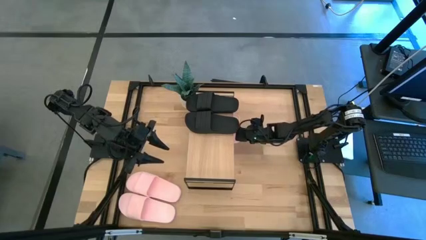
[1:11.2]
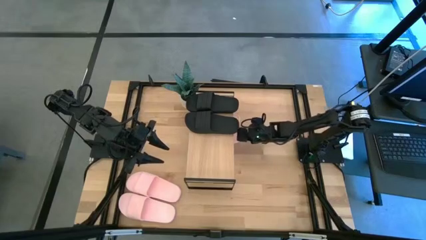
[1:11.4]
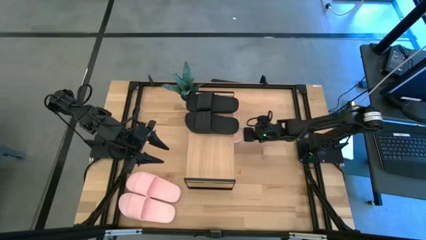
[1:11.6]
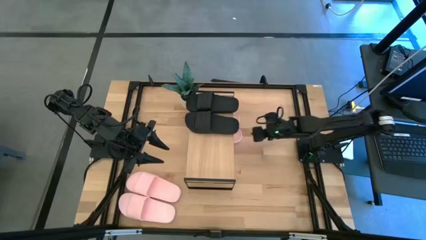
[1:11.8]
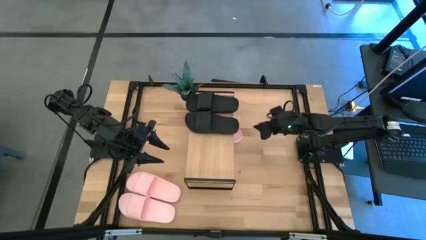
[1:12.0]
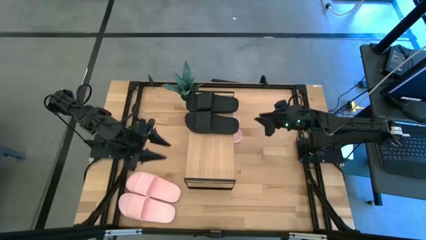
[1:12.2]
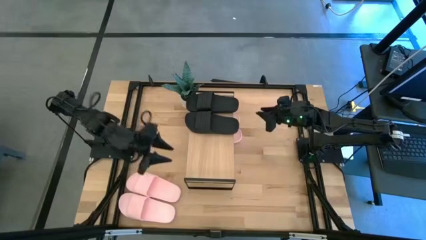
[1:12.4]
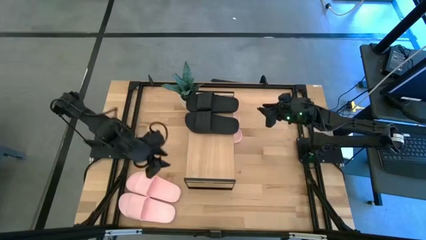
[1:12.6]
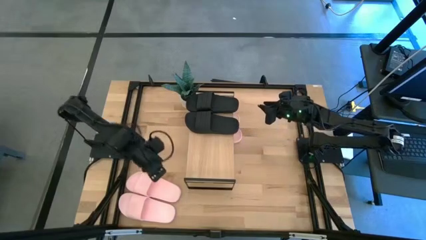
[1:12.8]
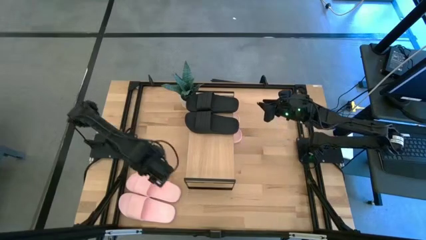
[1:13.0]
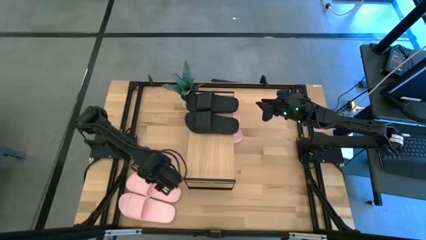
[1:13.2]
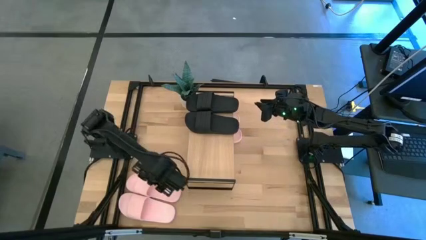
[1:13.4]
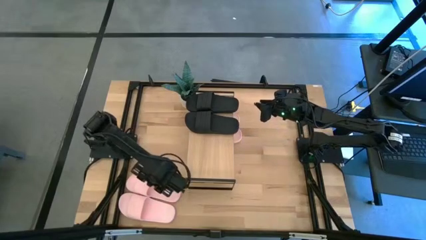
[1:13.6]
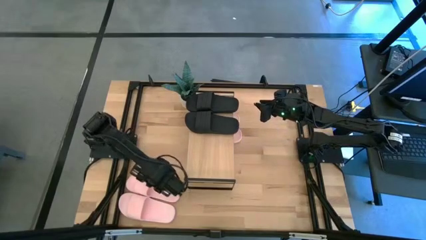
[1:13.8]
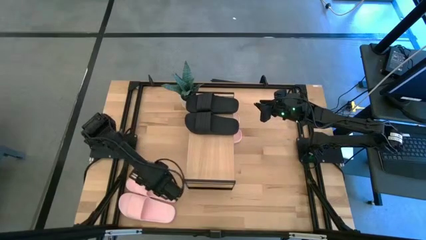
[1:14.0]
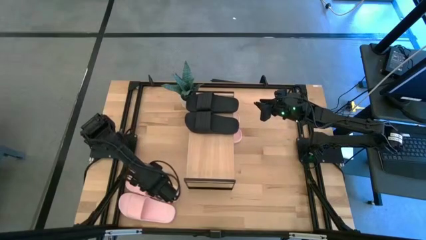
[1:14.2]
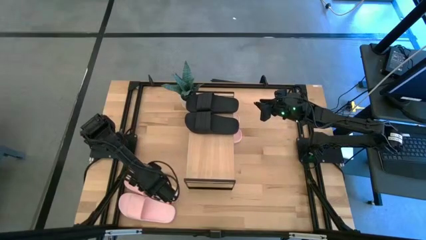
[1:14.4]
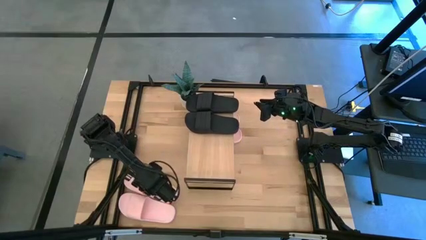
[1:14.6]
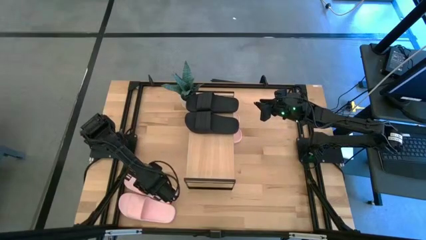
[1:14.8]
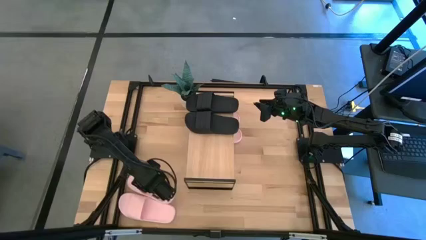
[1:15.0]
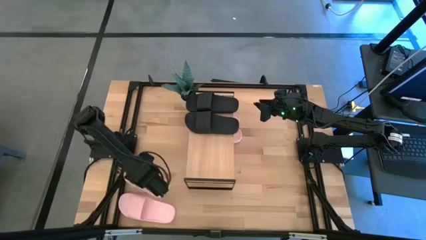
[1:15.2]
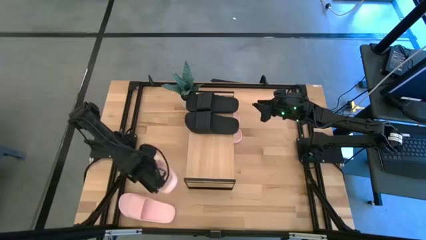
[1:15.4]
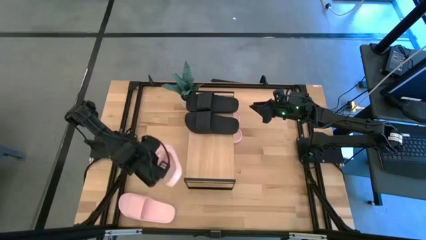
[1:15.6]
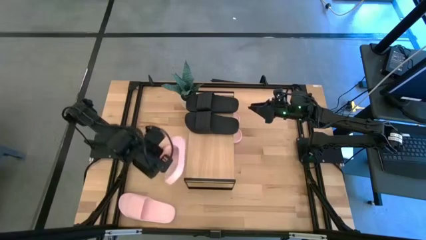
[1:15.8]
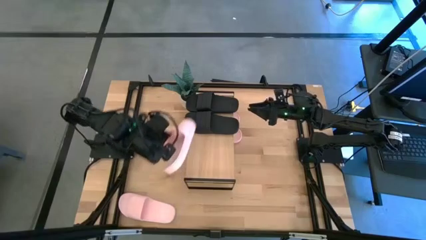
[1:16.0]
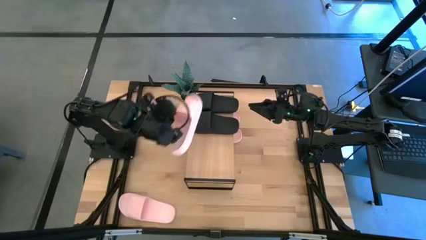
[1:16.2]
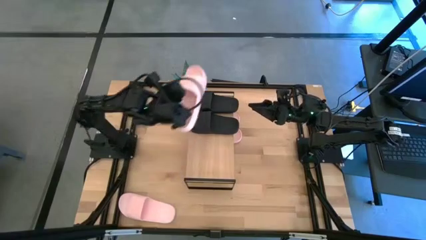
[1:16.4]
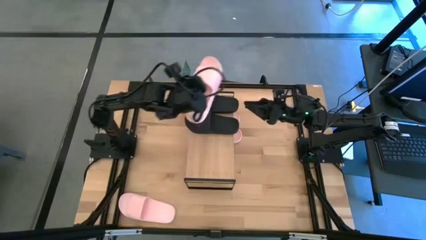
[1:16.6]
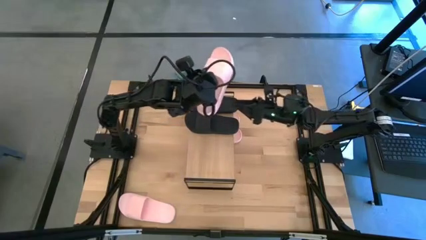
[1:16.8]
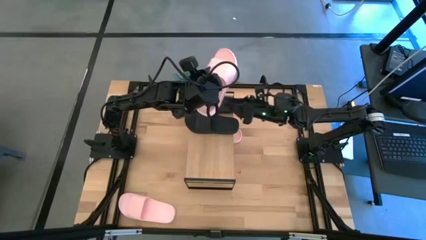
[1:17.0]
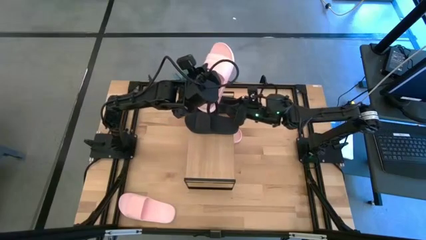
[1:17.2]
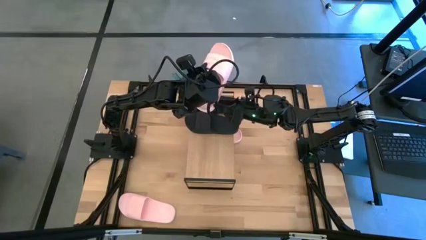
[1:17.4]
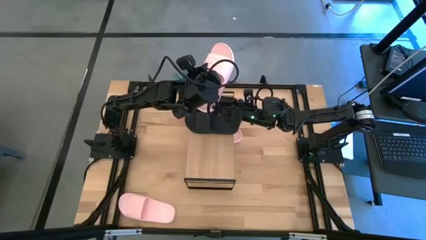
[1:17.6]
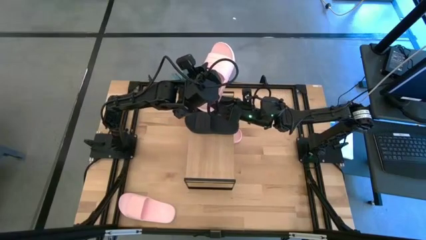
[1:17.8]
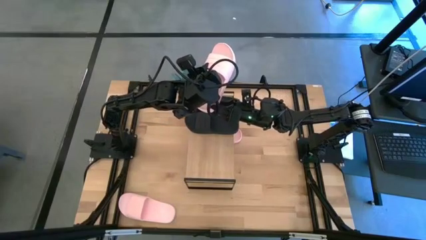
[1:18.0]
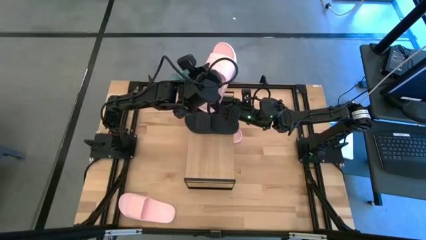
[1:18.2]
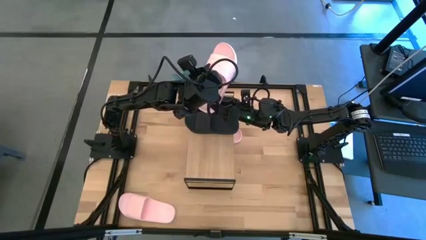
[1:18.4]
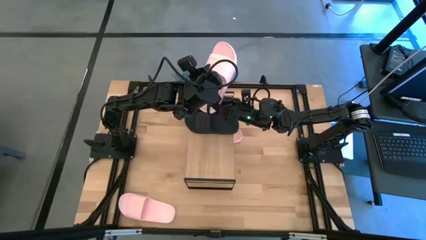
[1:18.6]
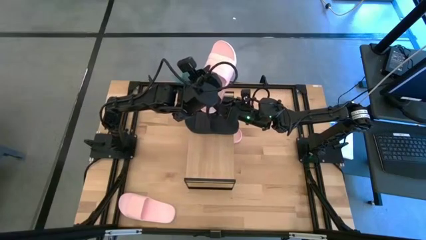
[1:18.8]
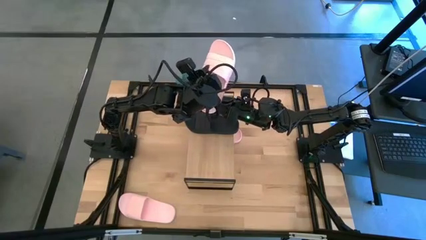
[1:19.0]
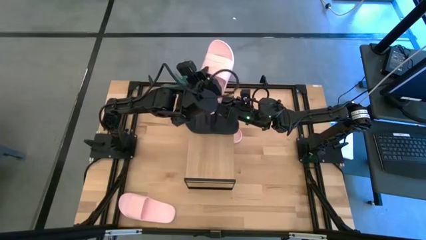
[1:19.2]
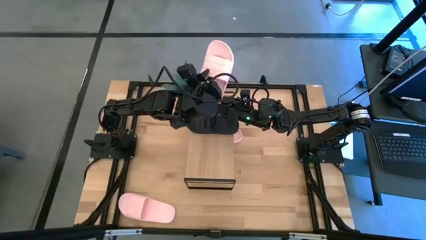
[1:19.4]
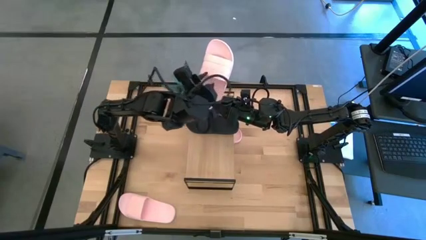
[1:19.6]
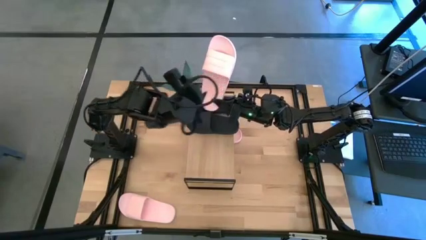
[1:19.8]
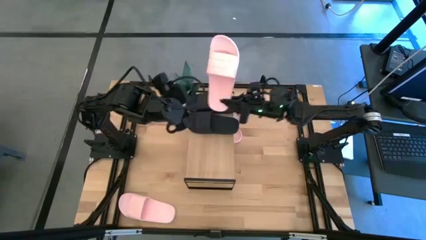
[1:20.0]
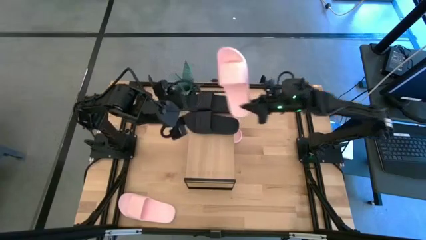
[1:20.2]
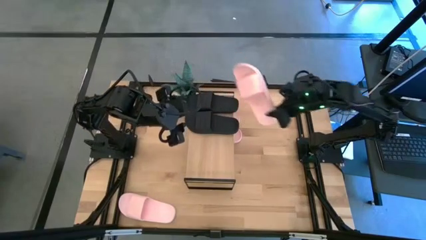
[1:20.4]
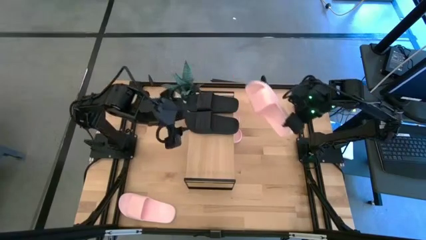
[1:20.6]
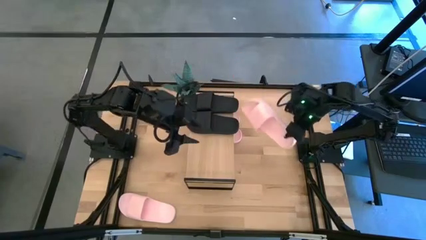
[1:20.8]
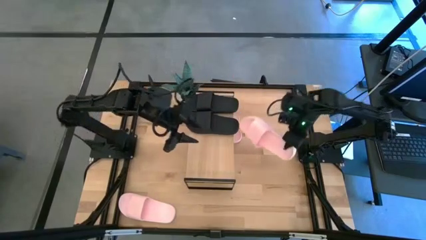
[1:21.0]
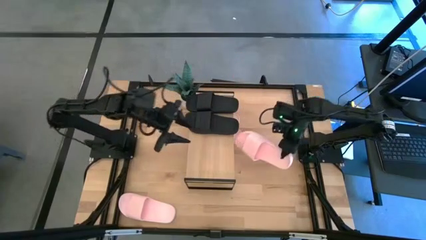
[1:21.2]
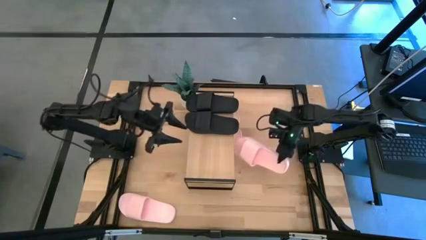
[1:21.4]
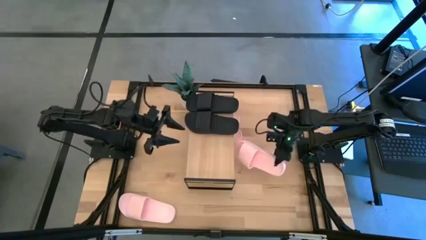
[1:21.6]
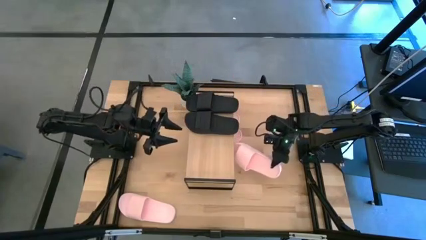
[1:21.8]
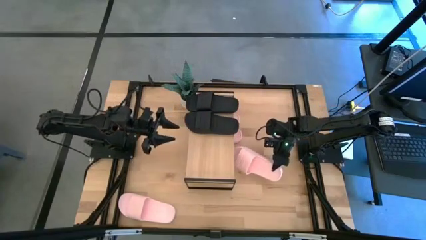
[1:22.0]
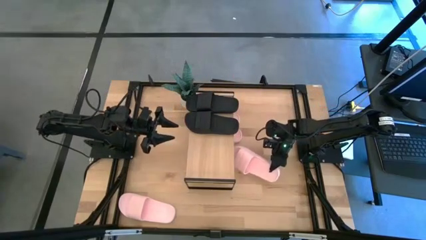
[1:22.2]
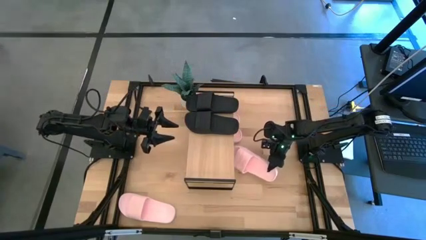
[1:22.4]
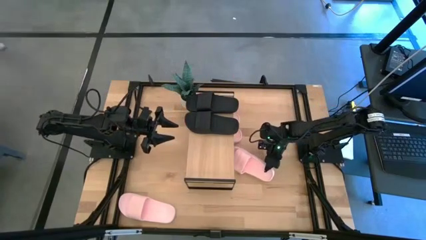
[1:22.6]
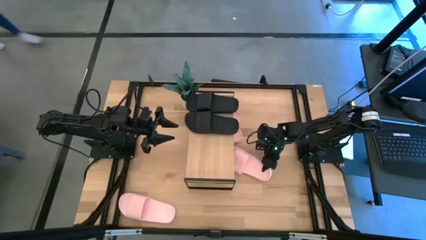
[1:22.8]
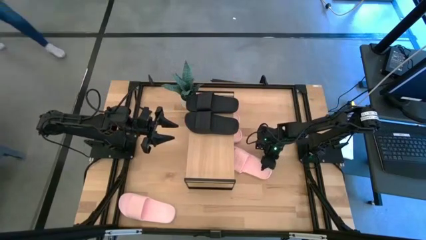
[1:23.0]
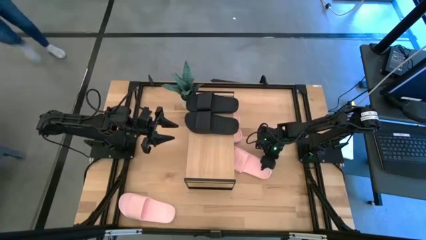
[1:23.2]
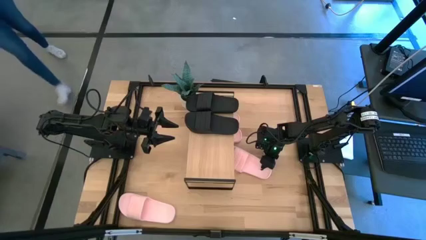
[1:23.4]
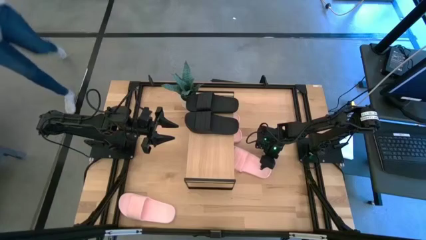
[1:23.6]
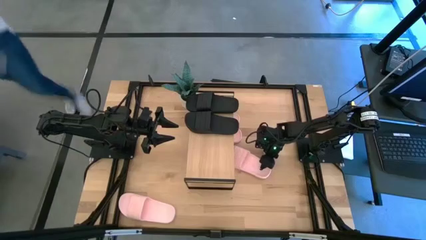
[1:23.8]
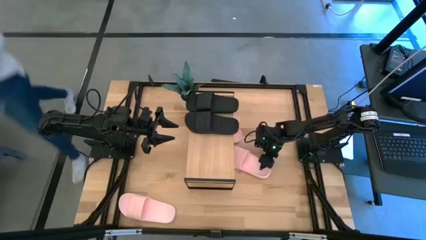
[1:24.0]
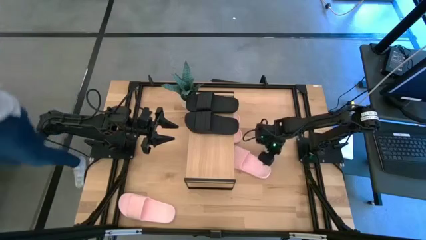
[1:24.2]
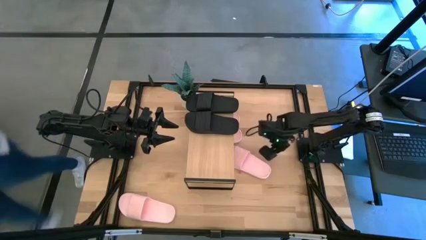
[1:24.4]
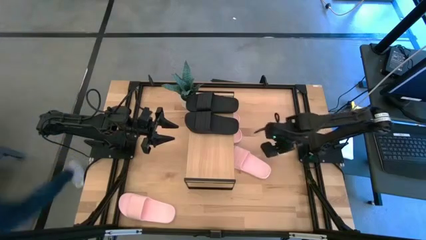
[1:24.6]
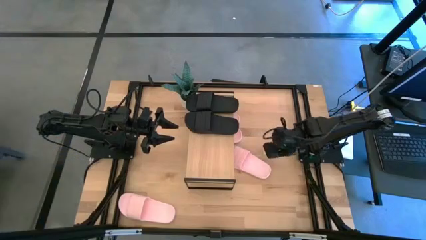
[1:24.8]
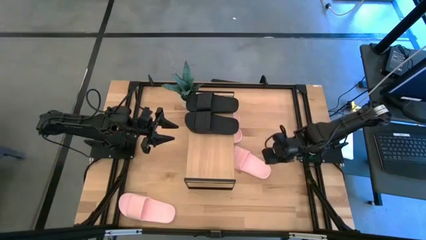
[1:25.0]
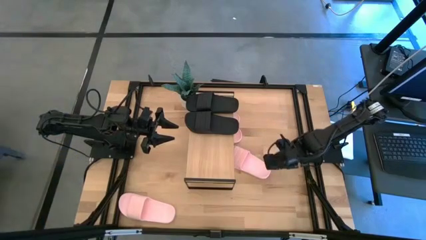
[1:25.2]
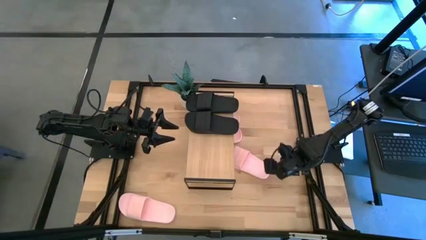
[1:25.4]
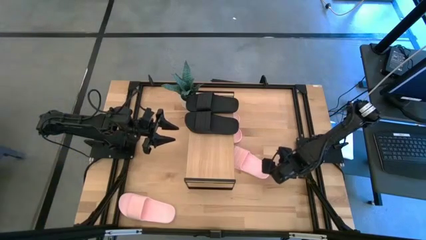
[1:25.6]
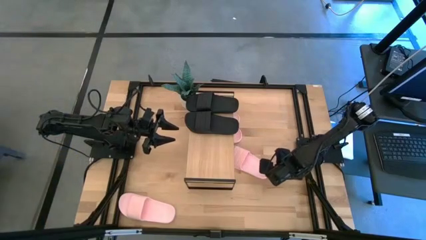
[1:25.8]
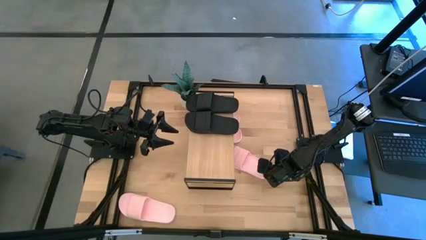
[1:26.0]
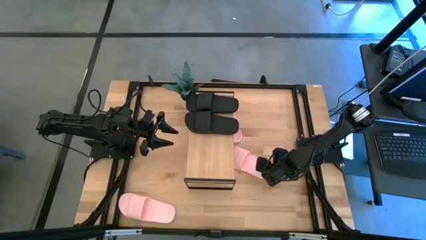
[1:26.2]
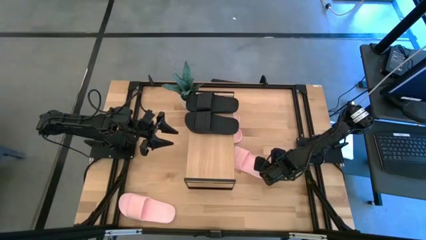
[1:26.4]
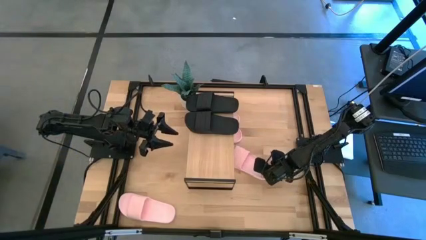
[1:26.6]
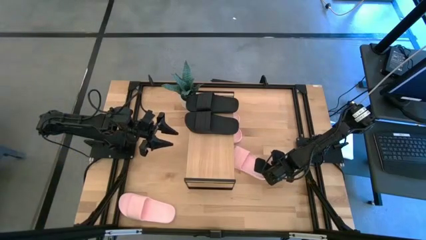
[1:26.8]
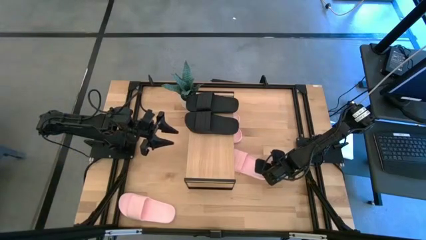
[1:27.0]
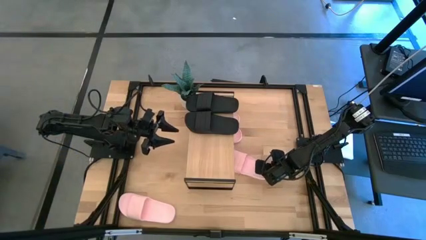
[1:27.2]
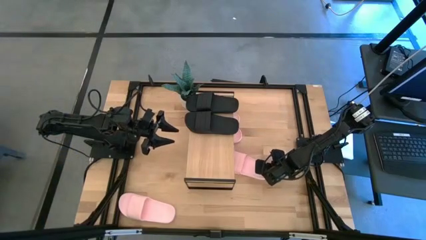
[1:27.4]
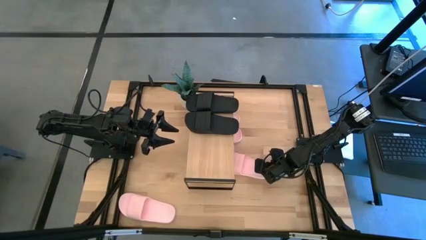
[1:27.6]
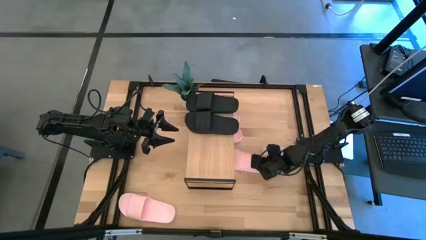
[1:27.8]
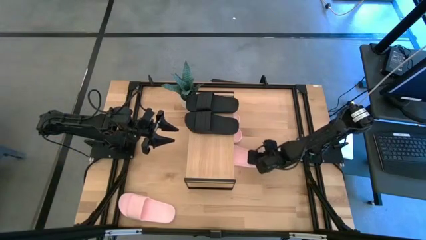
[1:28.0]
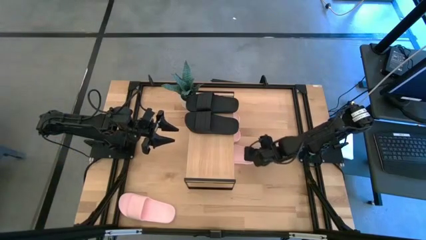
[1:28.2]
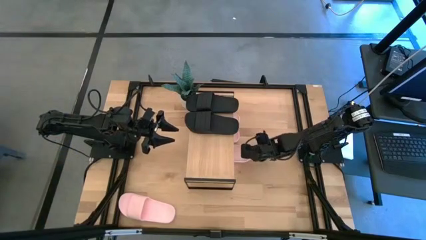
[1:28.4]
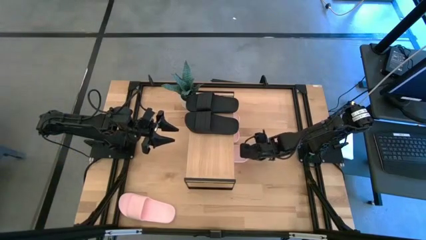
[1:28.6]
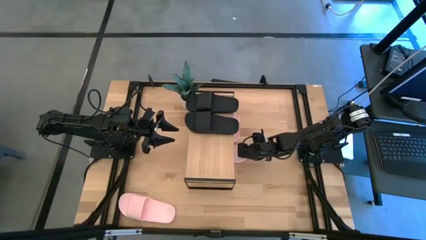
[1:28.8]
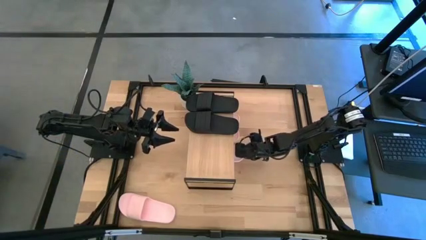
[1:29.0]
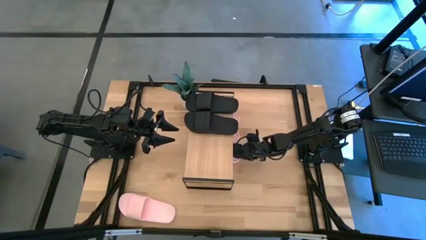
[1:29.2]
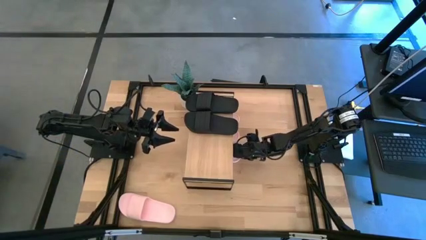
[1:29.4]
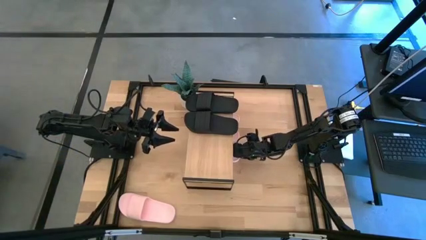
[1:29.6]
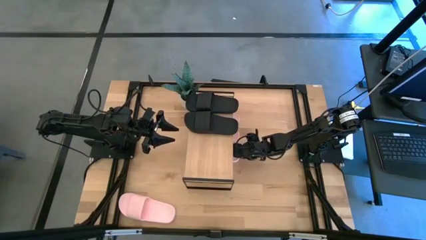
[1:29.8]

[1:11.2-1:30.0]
Task: Pick and place slides into the shelf
Put the pink slide under the shelf
